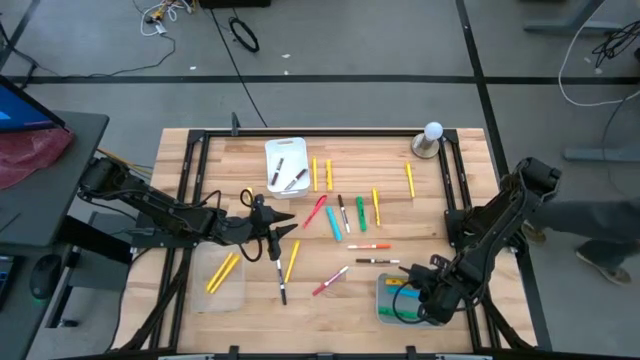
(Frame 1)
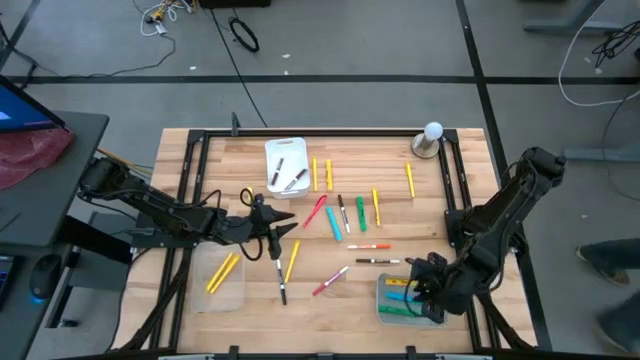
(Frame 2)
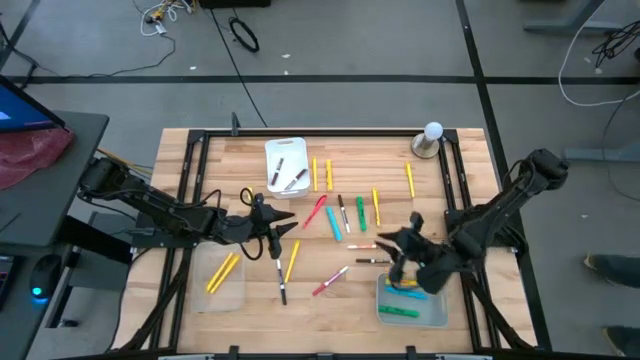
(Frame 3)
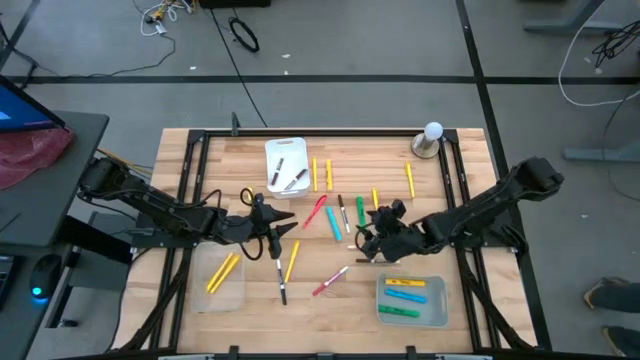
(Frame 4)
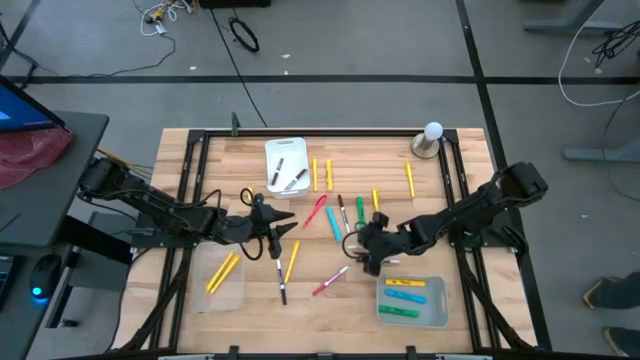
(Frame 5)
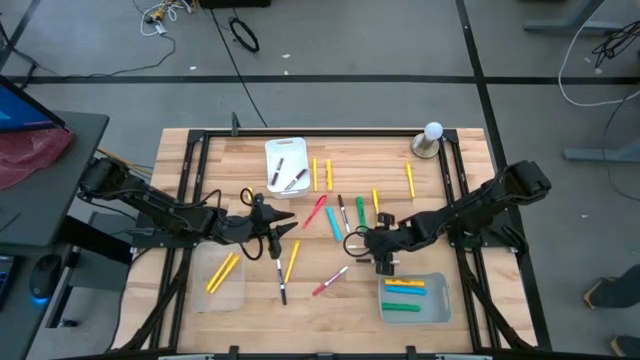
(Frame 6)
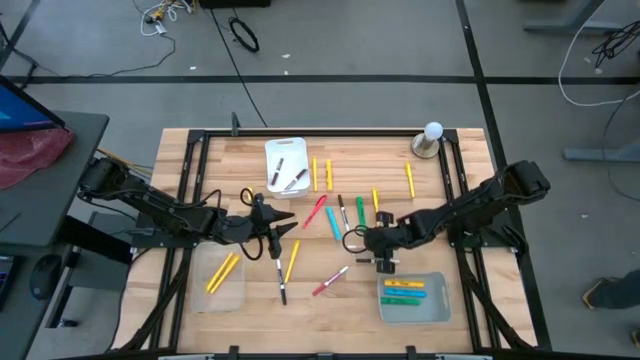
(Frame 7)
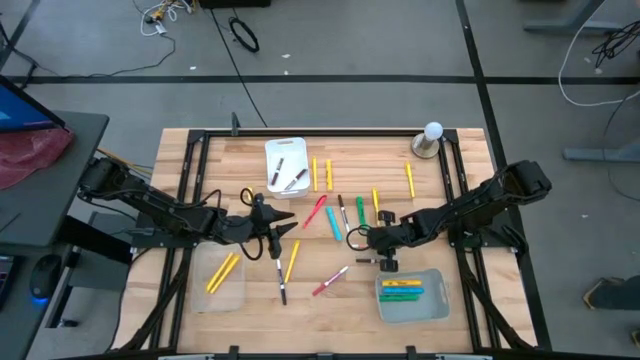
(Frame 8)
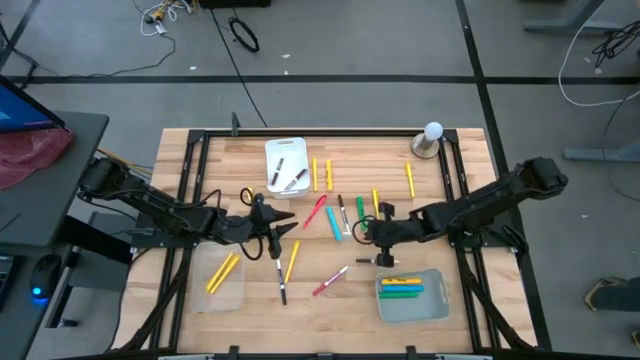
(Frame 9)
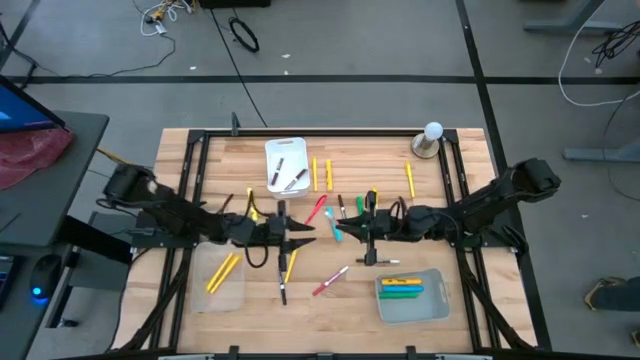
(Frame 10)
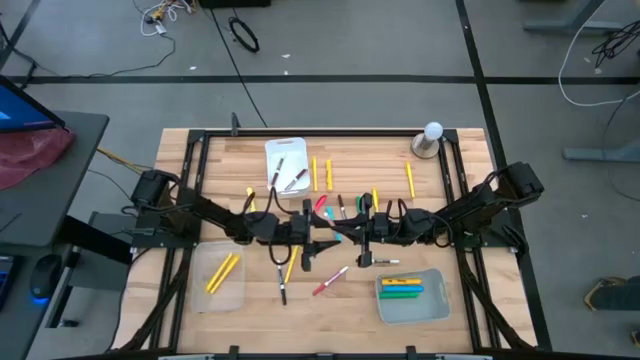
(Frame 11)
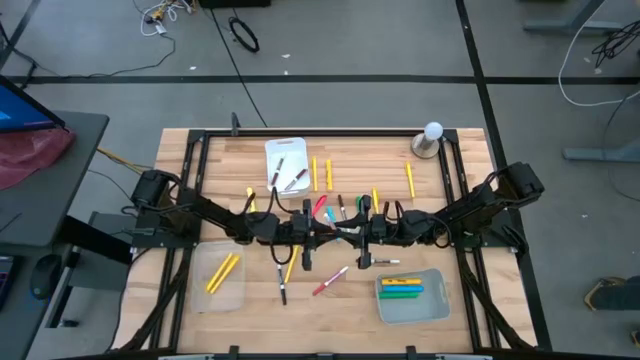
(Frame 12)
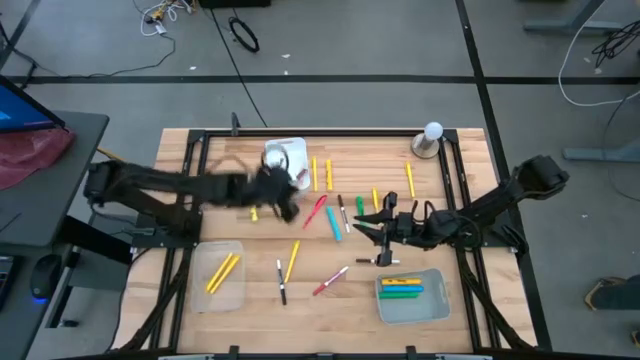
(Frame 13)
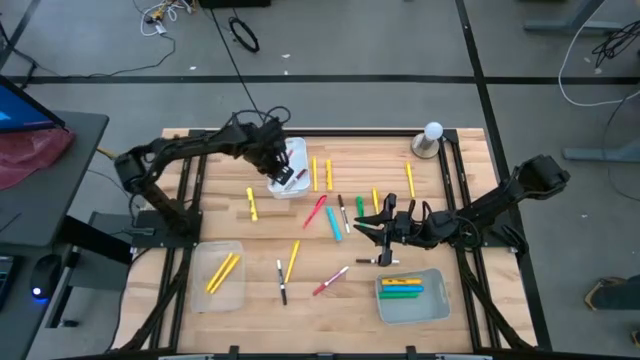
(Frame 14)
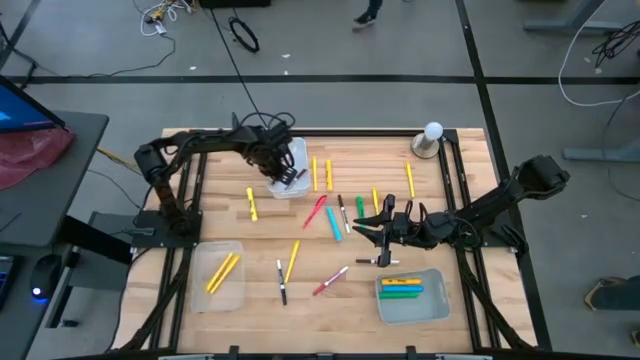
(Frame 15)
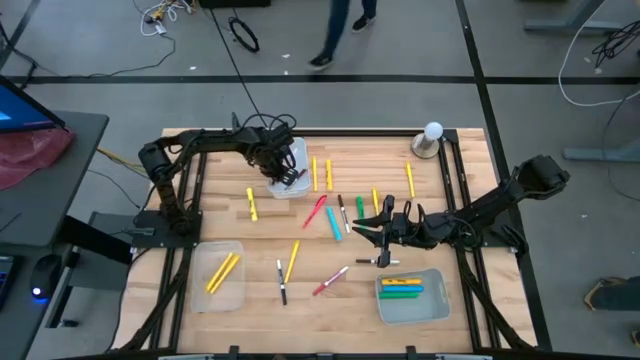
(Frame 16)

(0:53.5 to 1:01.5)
Task: Pick & Place Markers
Put the orange marker pen into the white bin

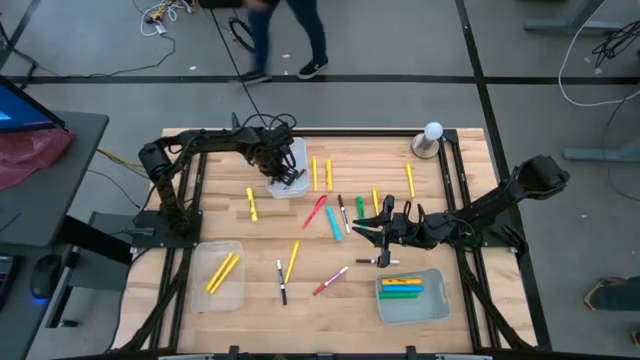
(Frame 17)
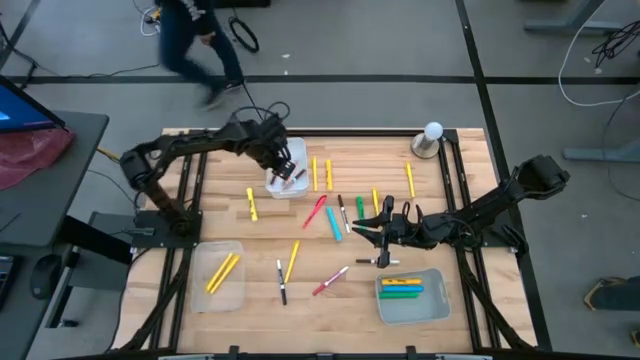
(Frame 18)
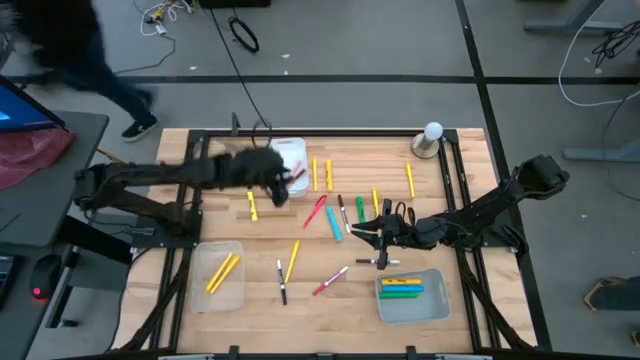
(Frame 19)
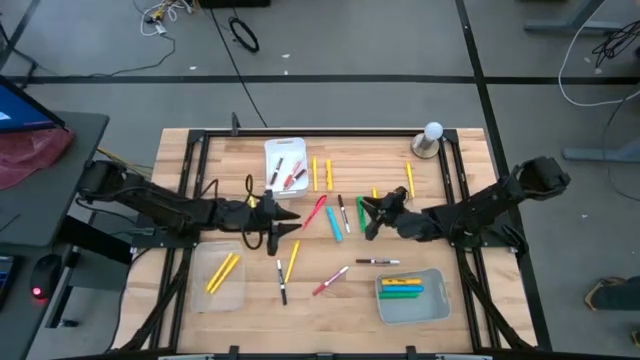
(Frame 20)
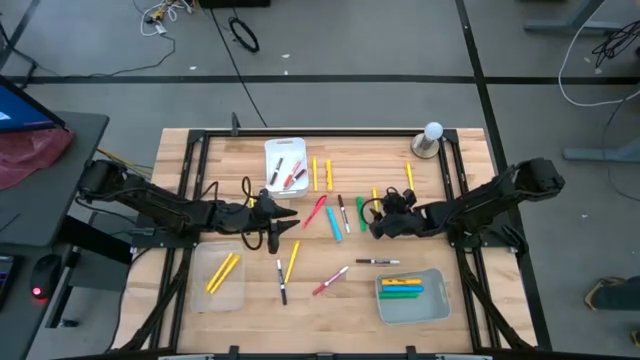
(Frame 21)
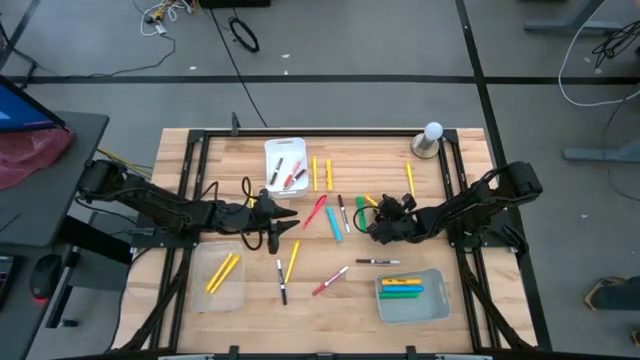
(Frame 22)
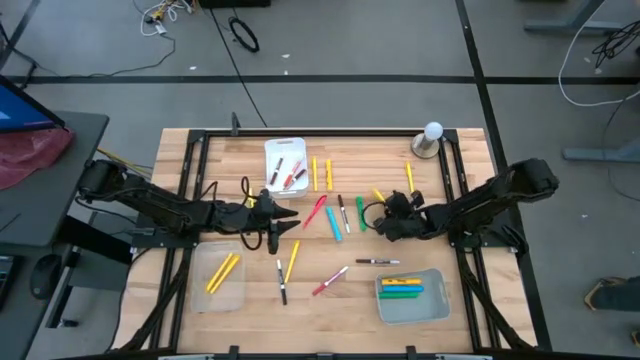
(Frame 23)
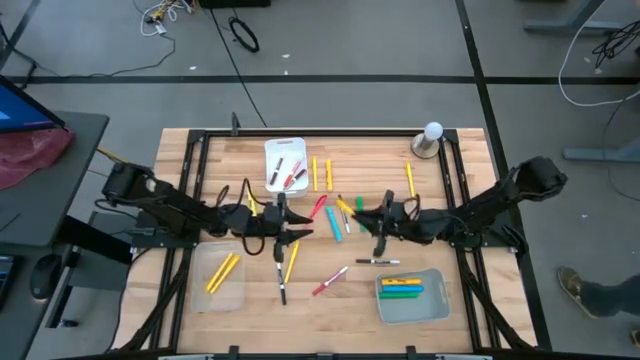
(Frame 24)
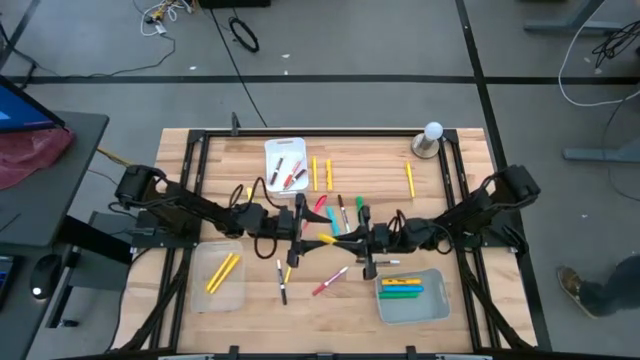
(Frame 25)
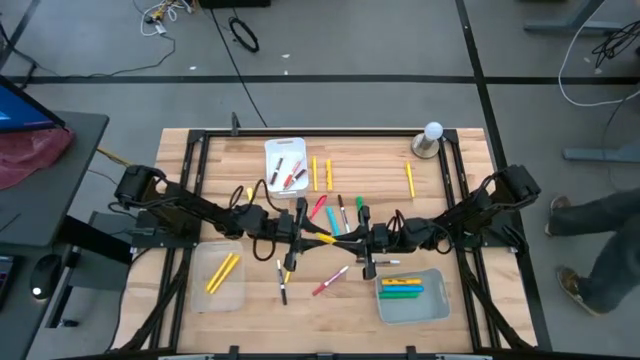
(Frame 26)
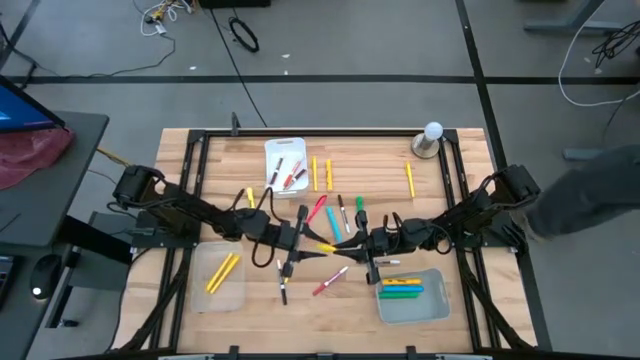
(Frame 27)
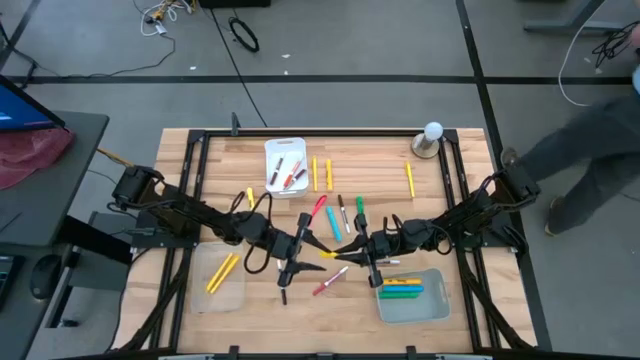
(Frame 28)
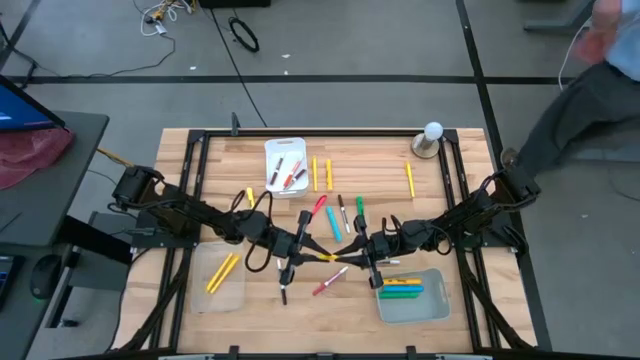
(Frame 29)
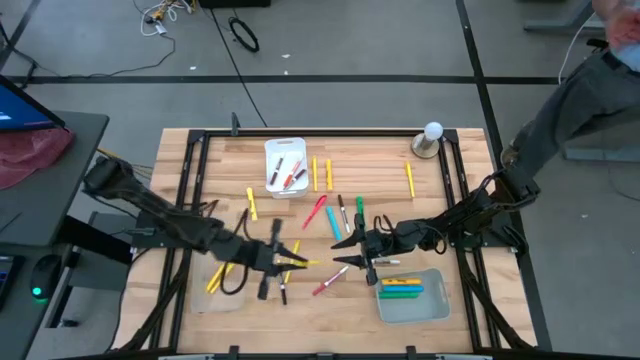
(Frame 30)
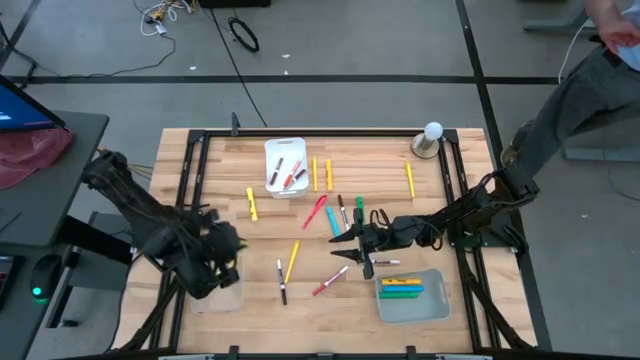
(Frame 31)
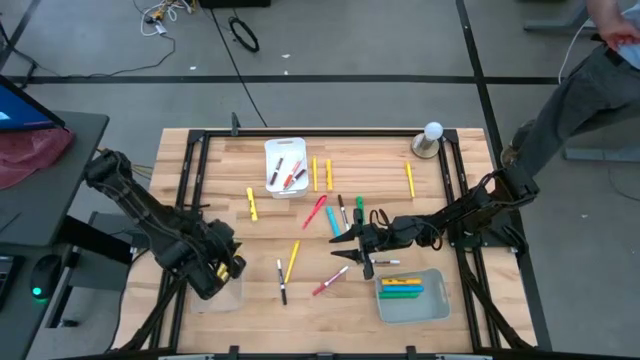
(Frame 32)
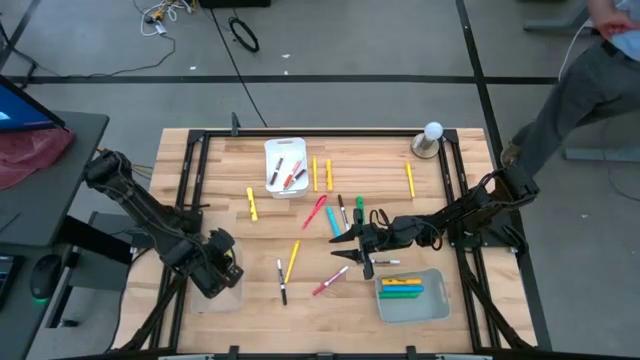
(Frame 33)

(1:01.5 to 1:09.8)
Put the yellow pen into the gray bin

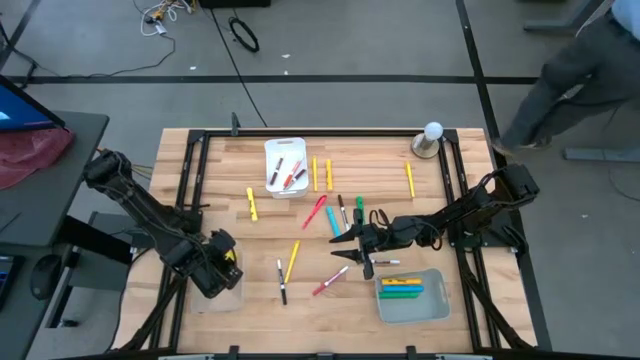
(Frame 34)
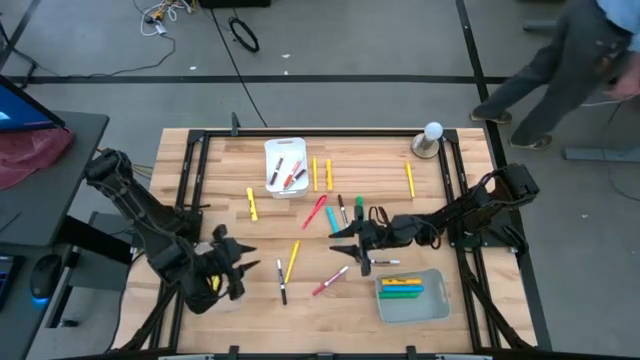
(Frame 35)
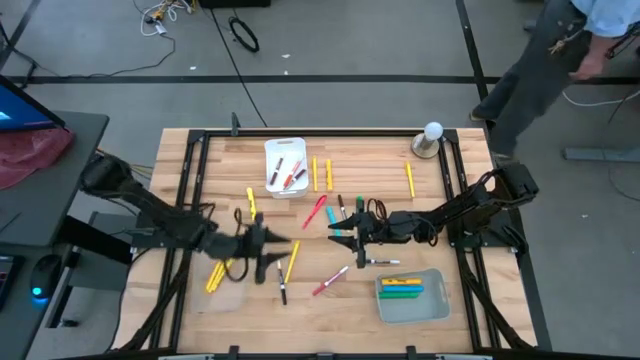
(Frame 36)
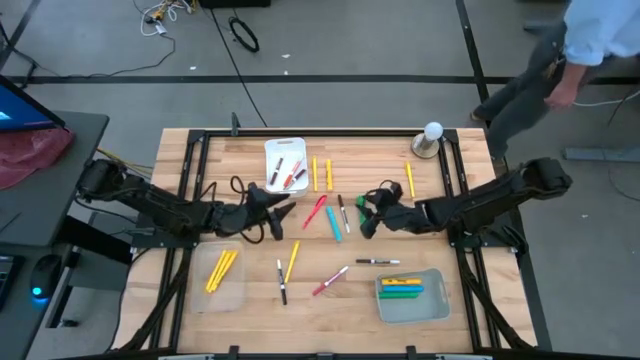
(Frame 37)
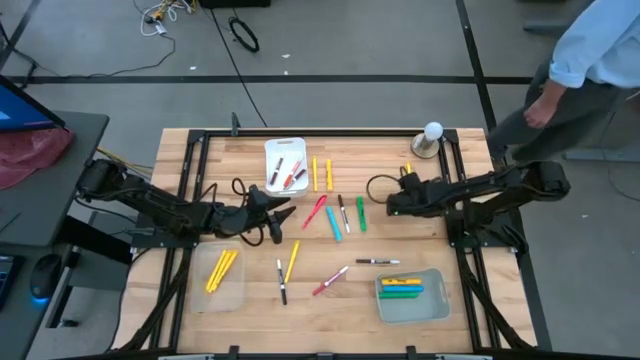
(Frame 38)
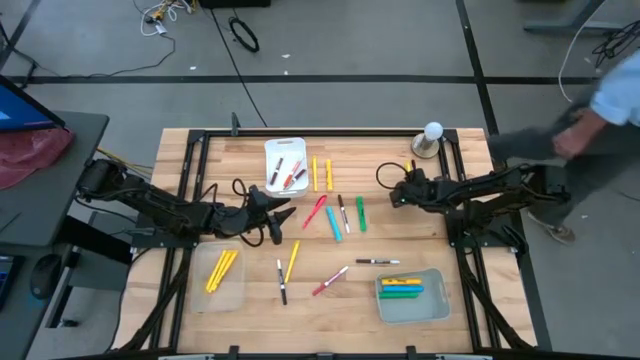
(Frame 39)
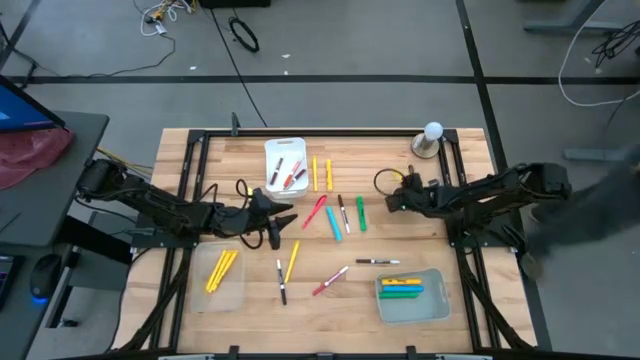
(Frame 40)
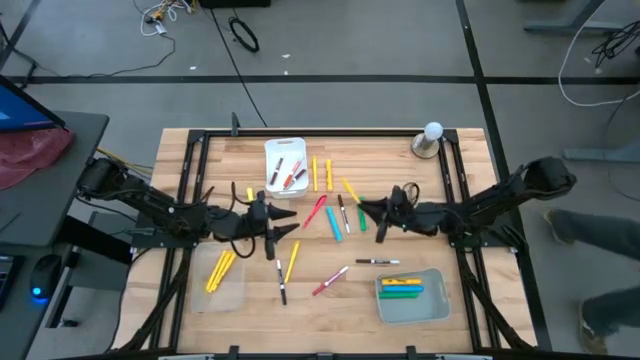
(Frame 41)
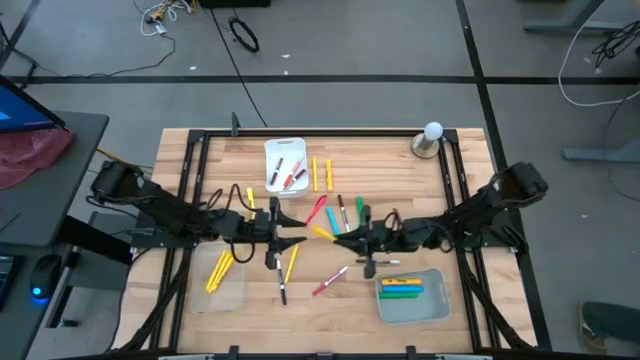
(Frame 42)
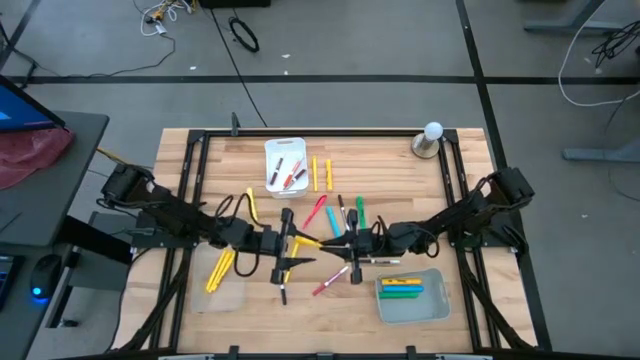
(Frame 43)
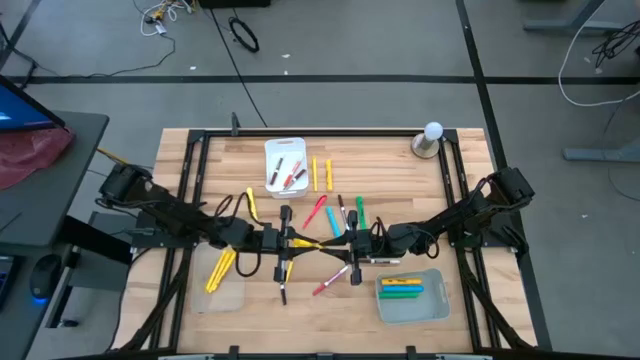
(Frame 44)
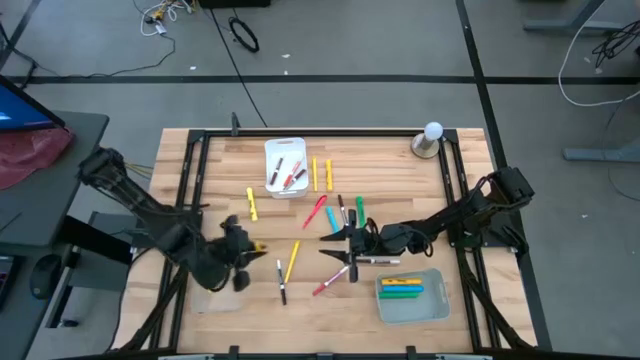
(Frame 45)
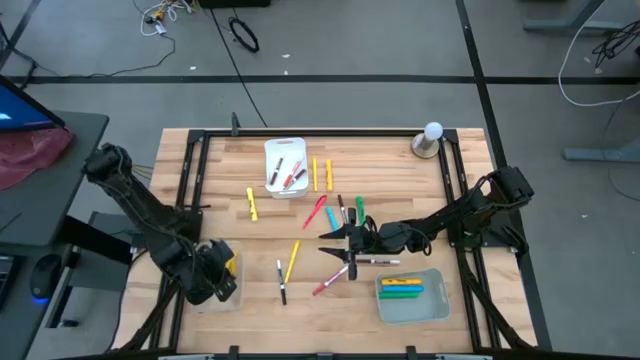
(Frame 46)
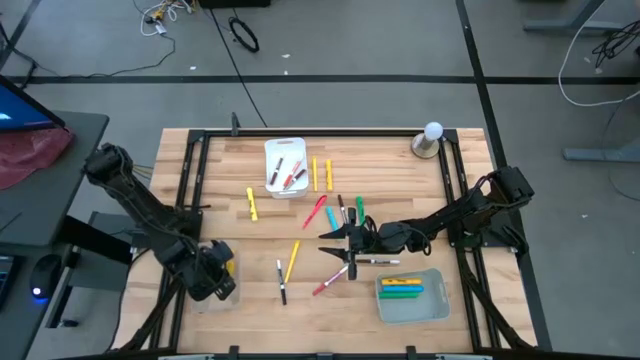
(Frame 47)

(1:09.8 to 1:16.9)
Put the yellow pen into the transparent bin
